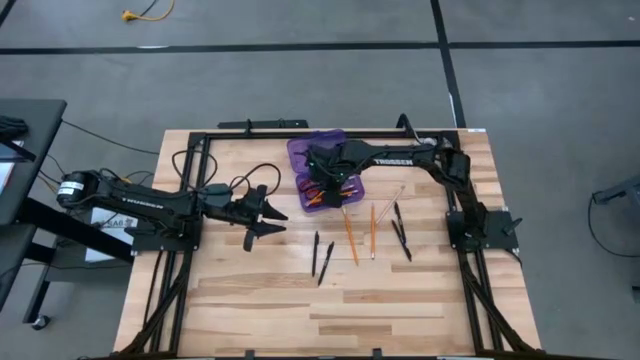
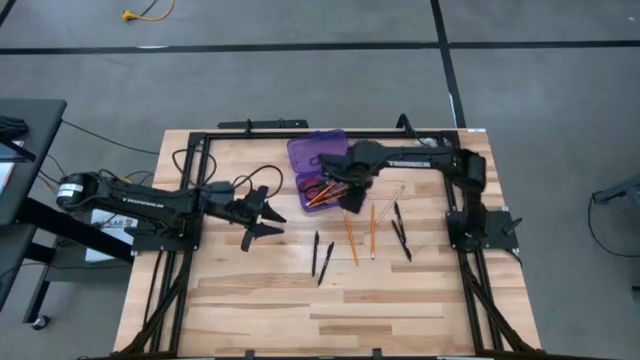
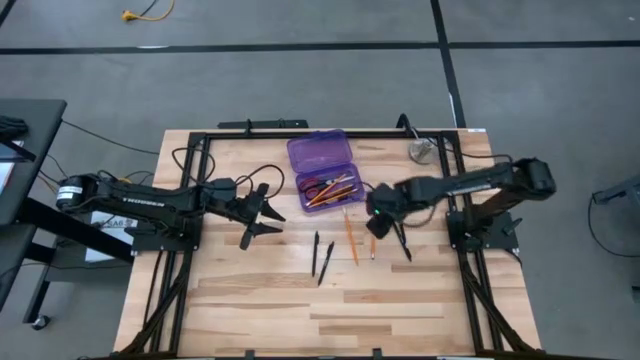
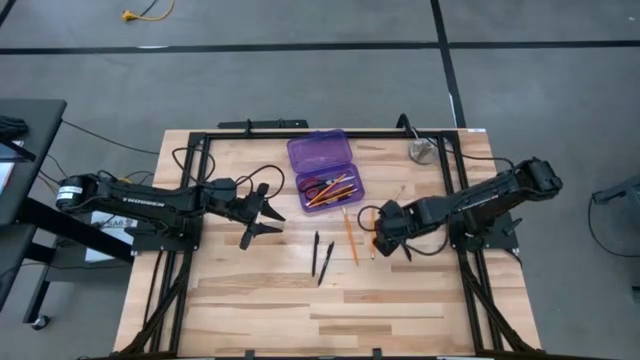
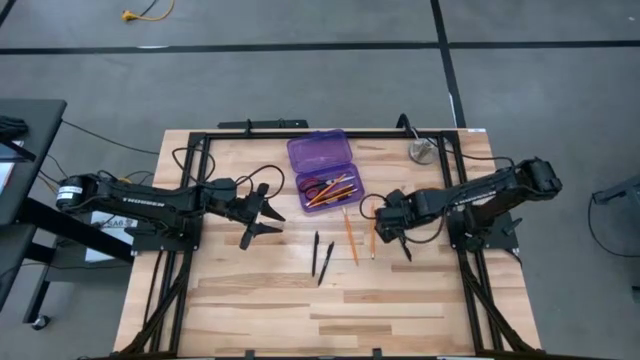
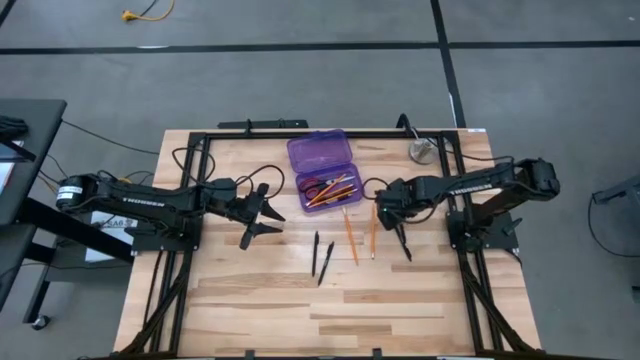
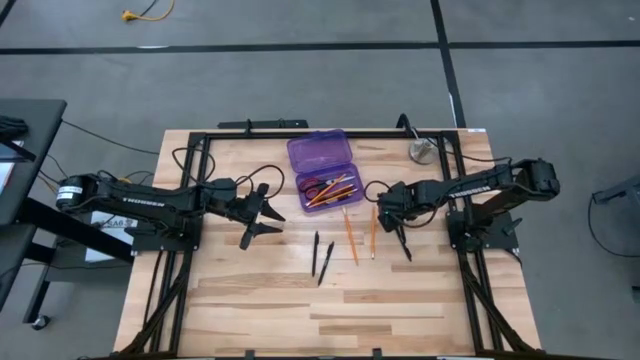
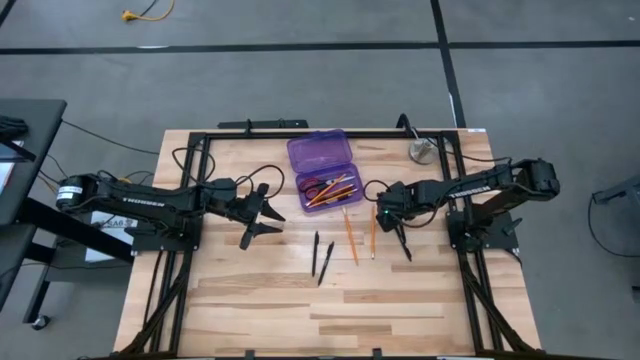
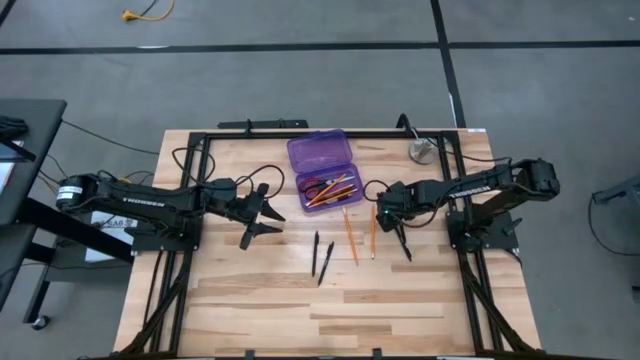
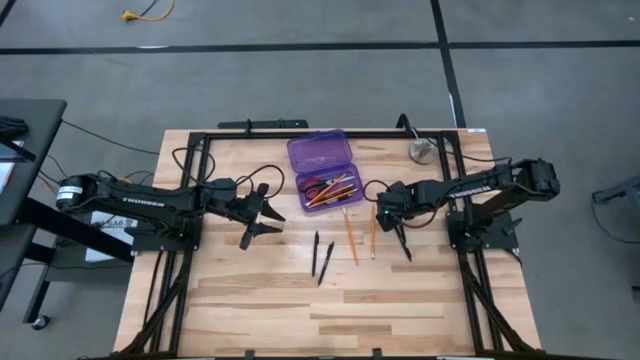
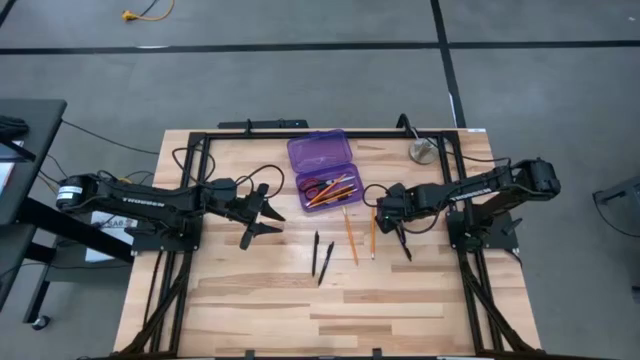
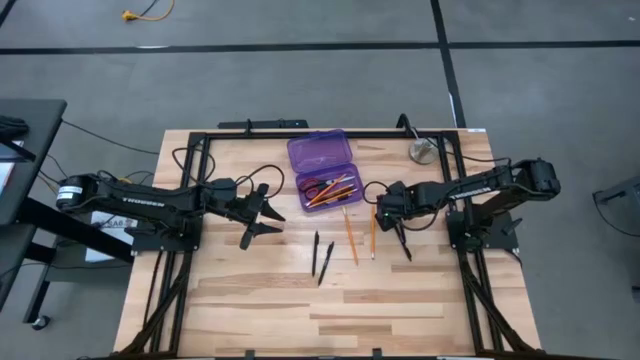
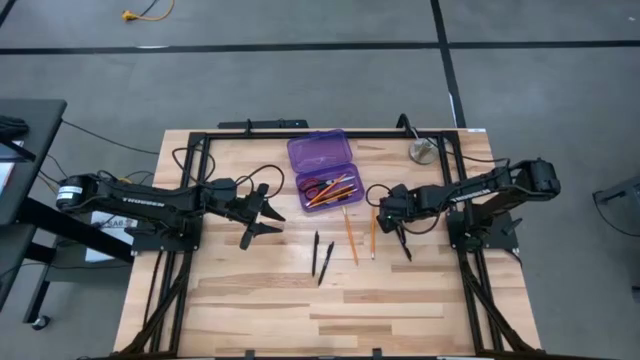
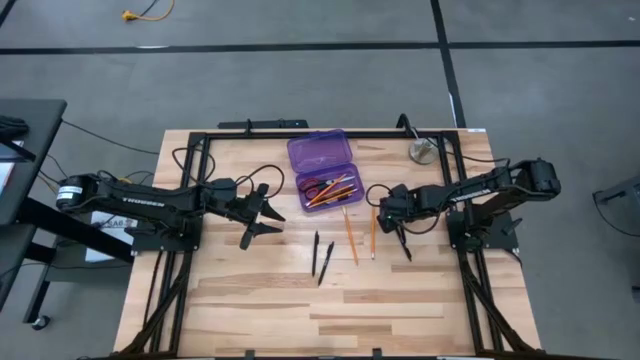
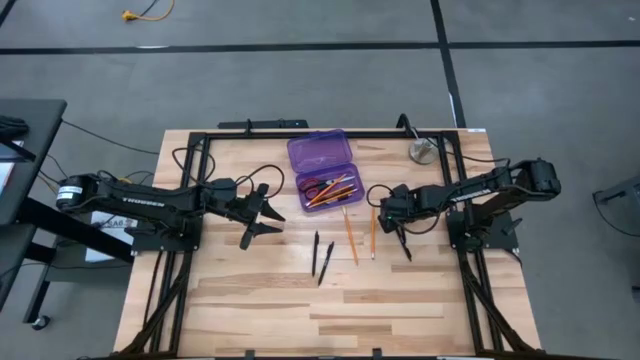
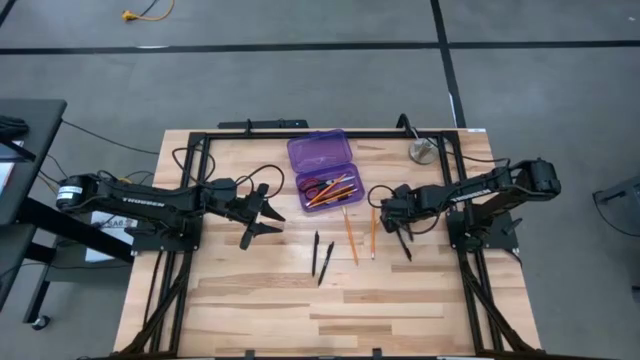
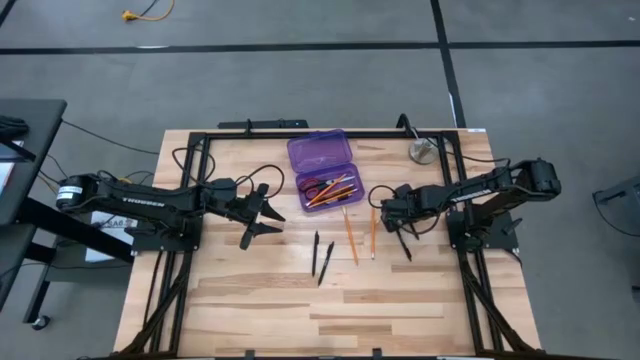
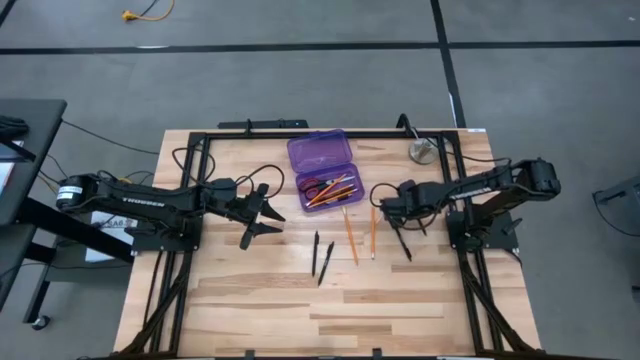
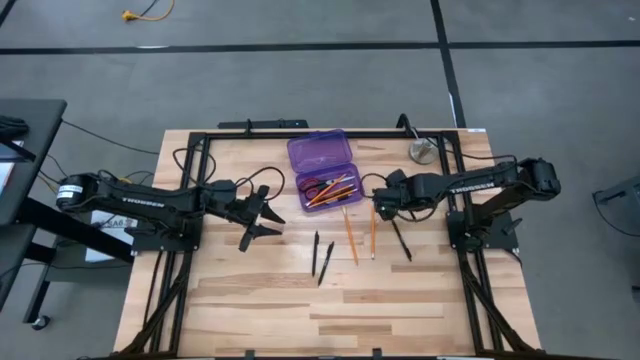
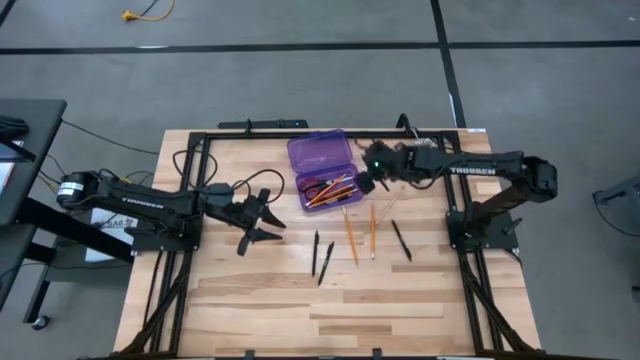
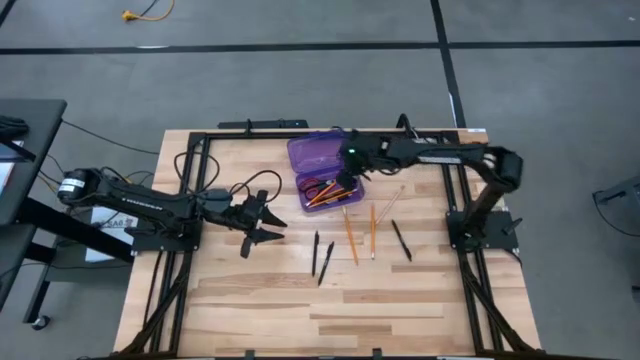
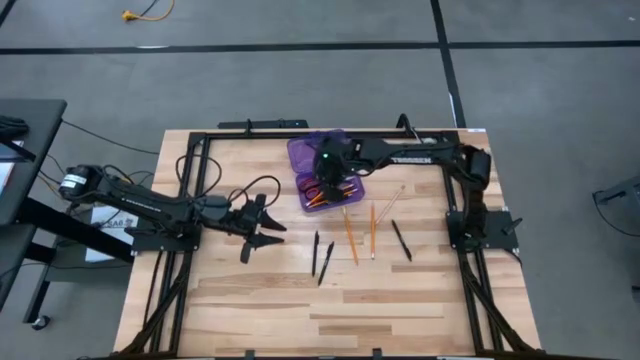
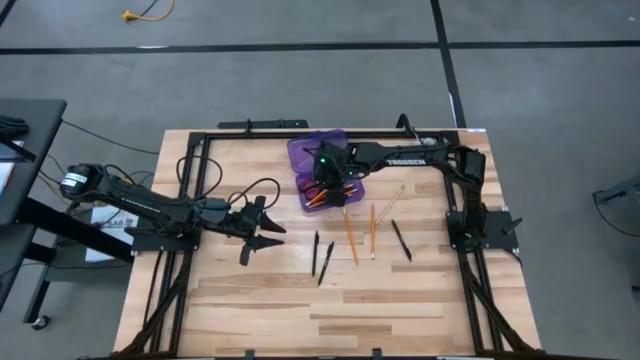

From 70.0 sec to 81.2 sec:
Task: Pick & place school supplies into a supply box
Put the black pen into the purple supply box

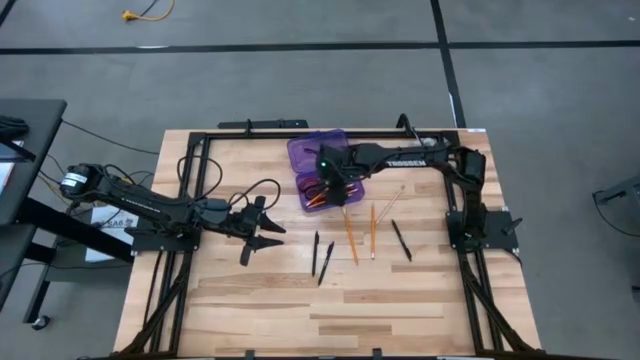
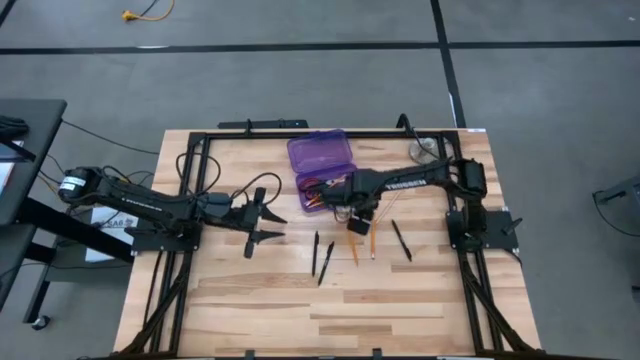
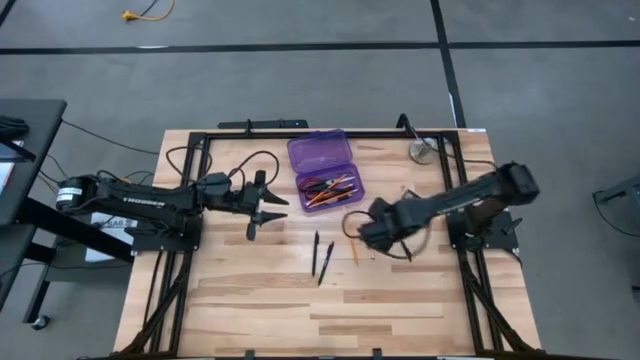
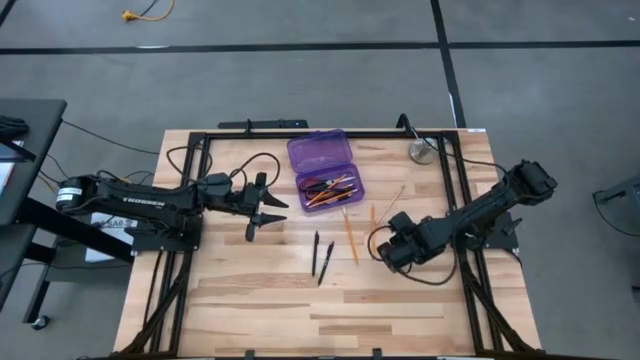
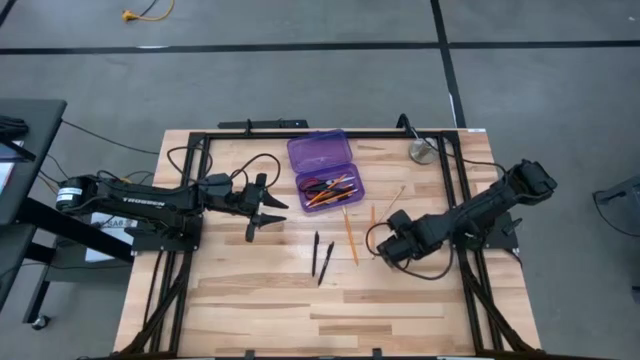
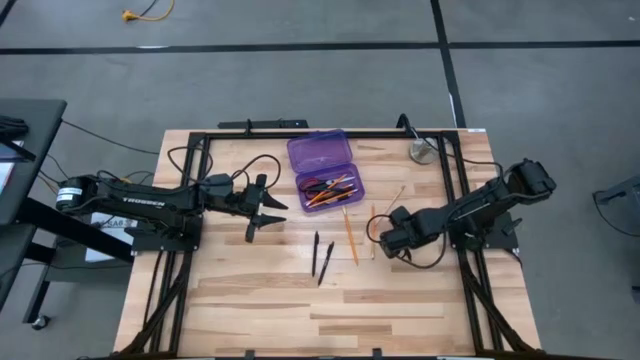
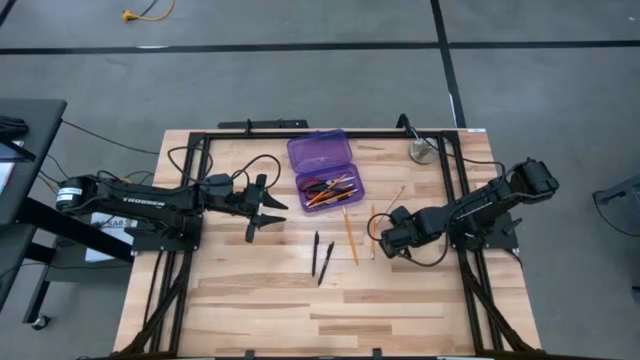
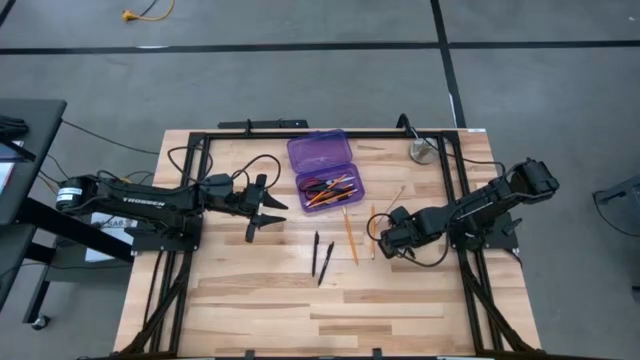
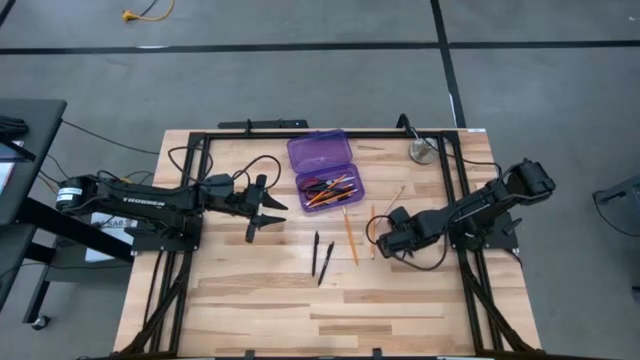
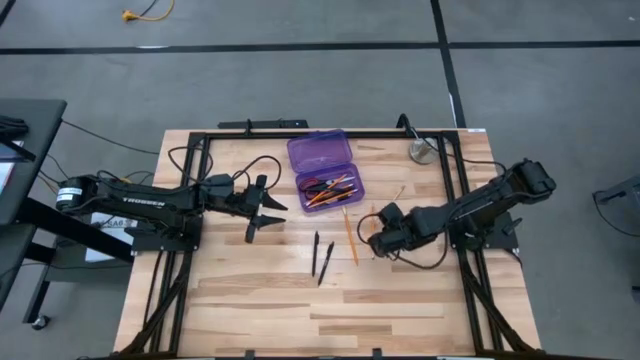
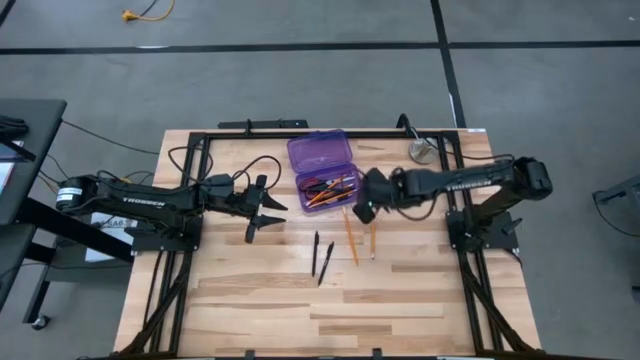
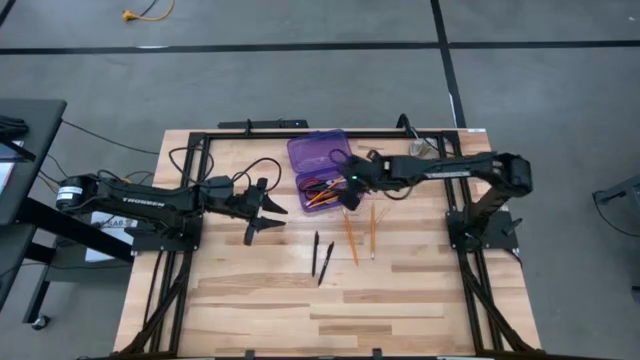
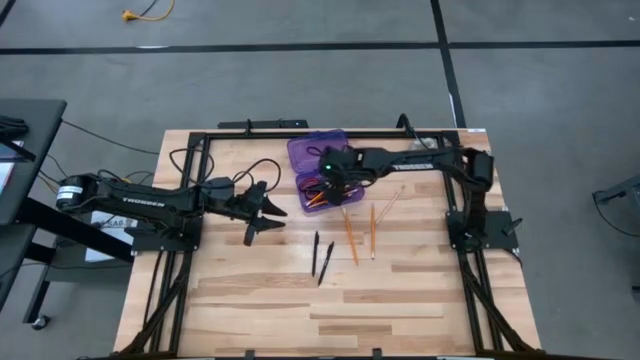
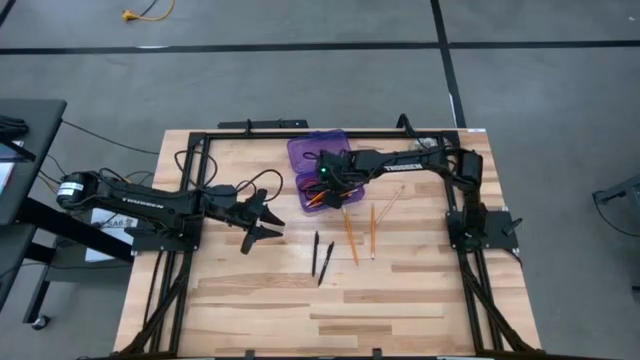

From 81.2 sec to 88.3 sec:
Put the black pen into the purple supply box

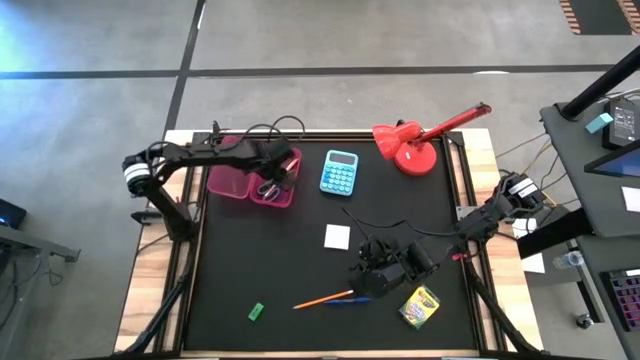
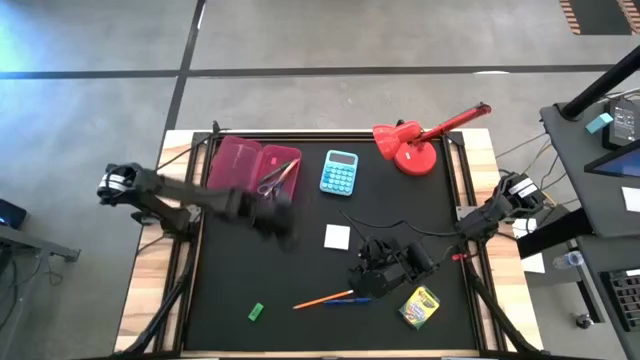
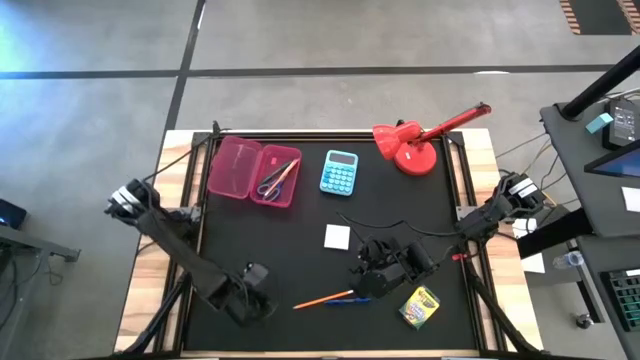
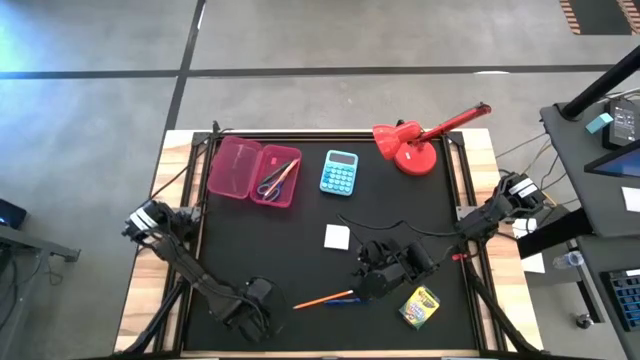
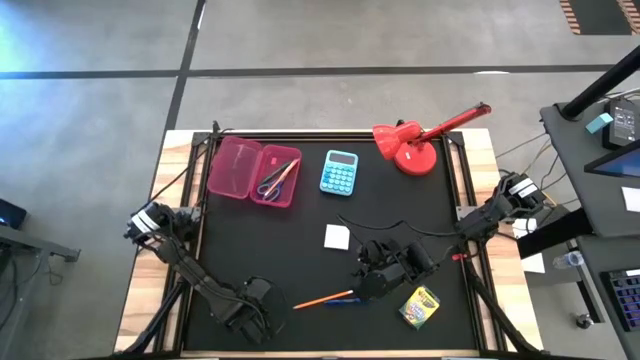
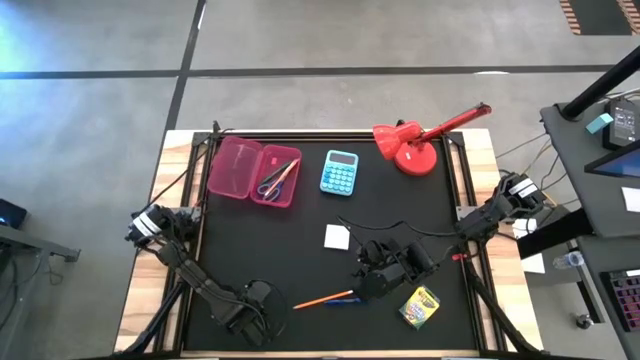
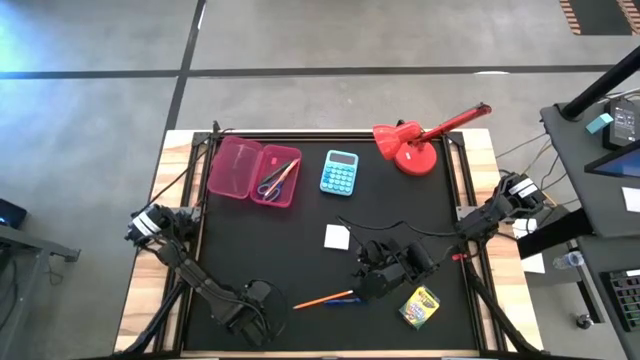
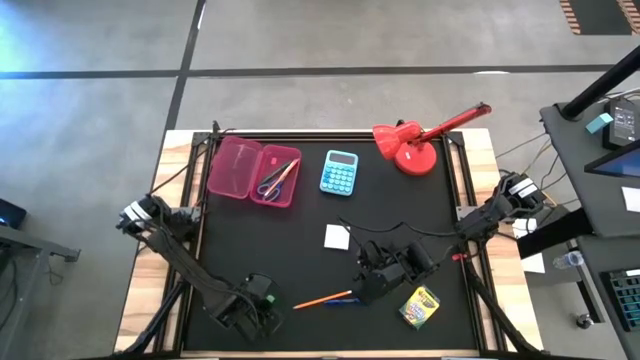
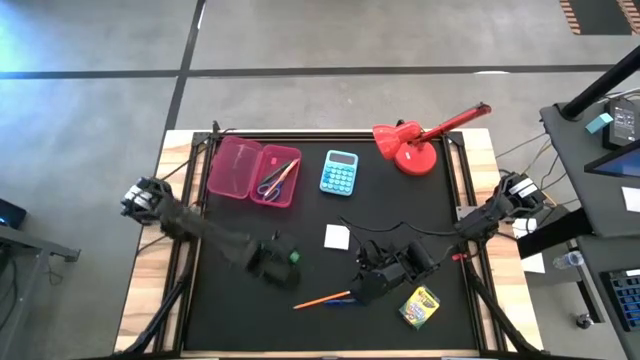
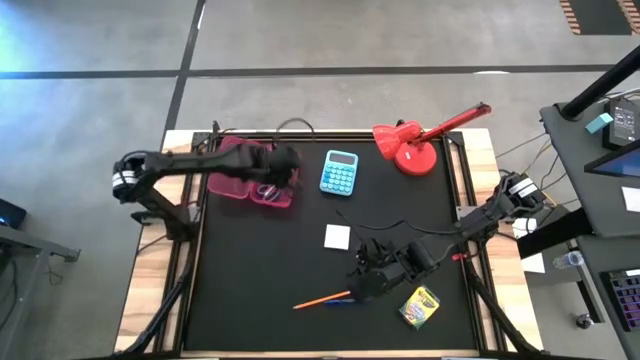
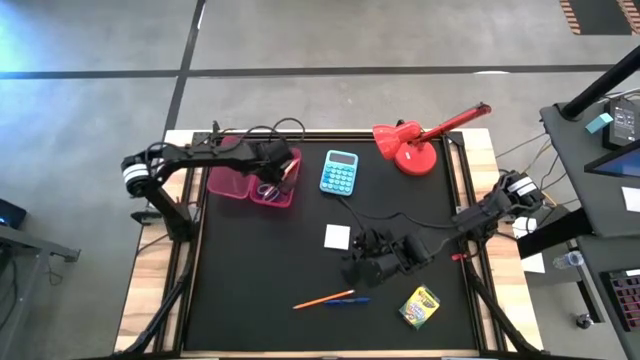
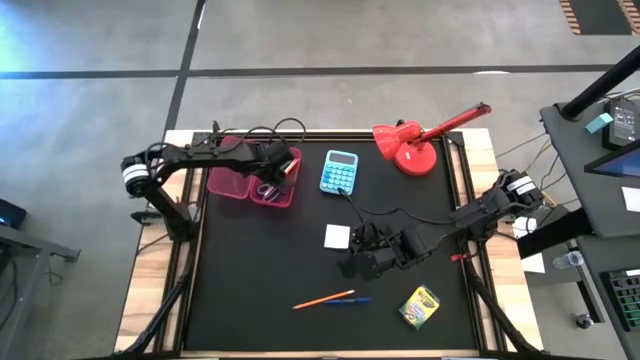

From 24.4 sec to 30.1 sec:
Task: Pack school essentials
Put the green eraser into the pink supply box
